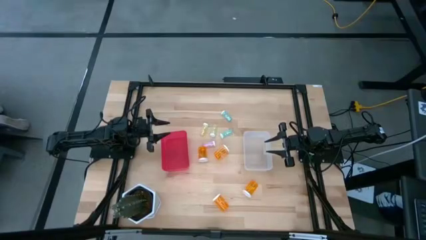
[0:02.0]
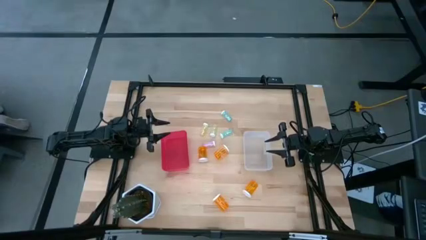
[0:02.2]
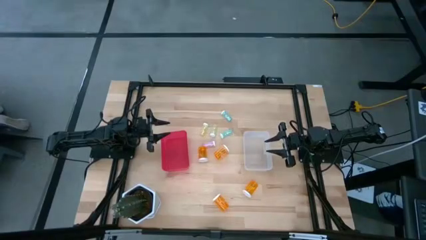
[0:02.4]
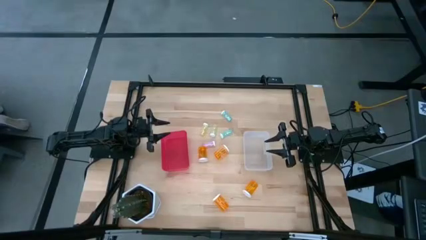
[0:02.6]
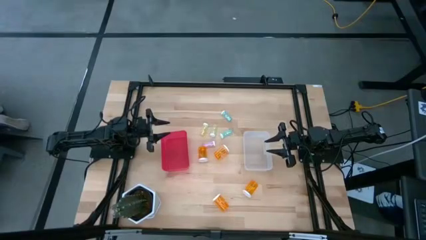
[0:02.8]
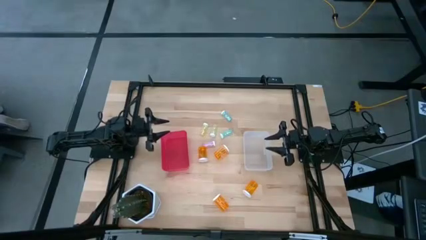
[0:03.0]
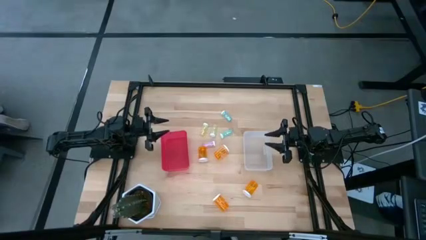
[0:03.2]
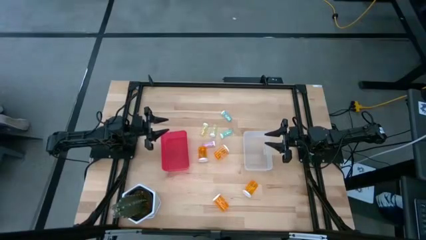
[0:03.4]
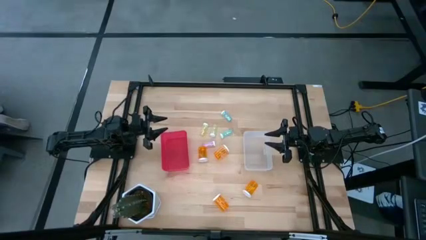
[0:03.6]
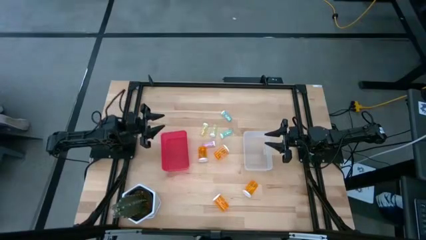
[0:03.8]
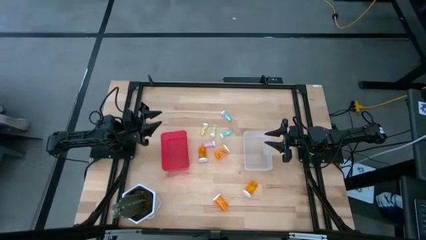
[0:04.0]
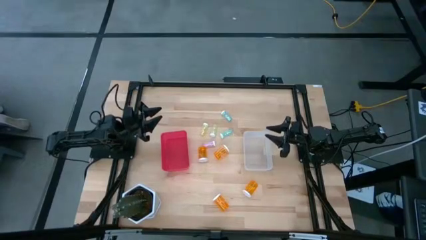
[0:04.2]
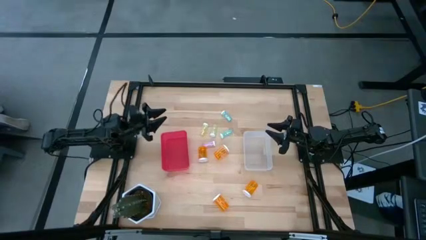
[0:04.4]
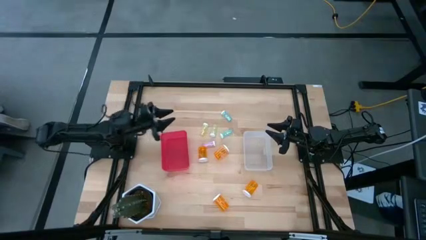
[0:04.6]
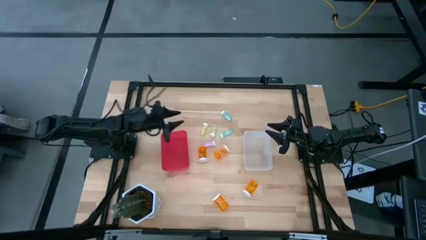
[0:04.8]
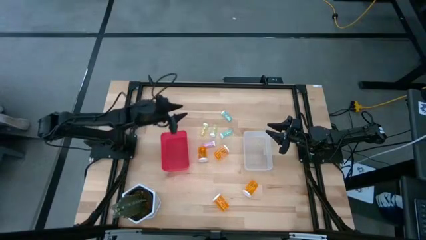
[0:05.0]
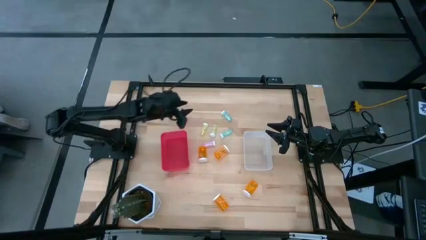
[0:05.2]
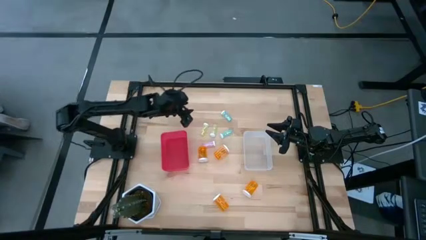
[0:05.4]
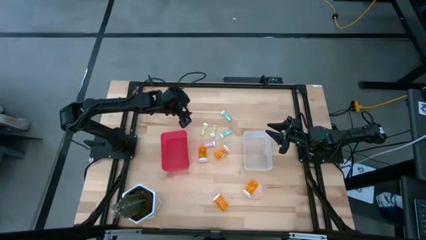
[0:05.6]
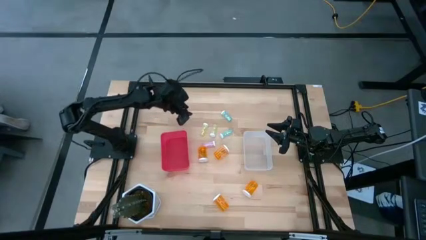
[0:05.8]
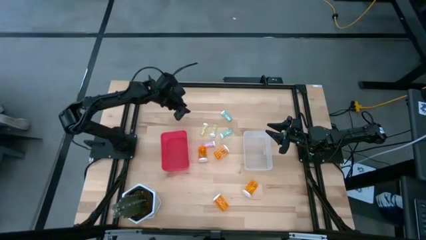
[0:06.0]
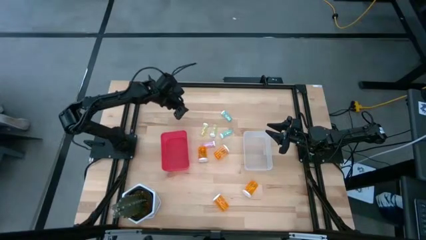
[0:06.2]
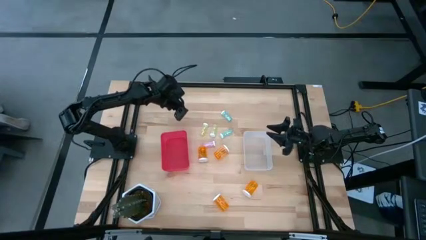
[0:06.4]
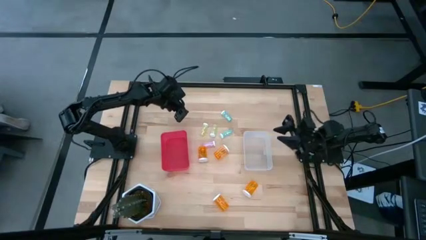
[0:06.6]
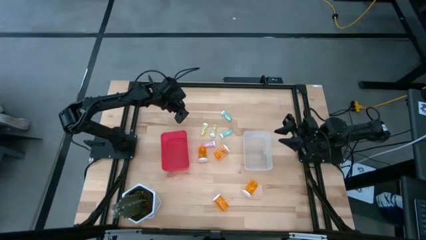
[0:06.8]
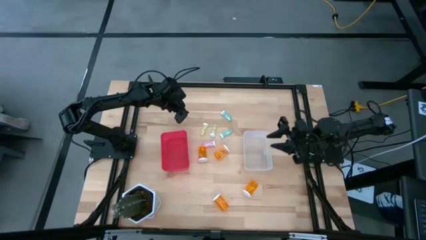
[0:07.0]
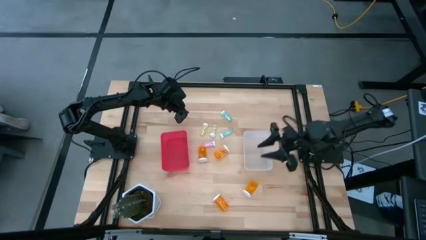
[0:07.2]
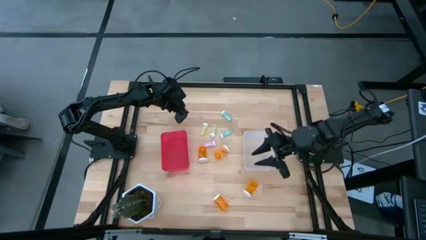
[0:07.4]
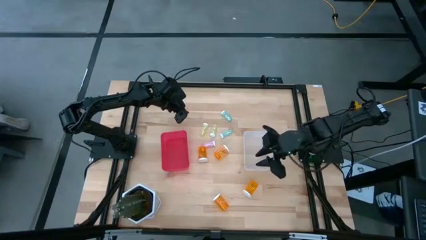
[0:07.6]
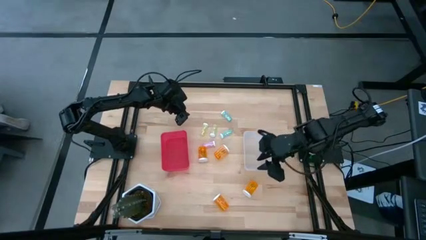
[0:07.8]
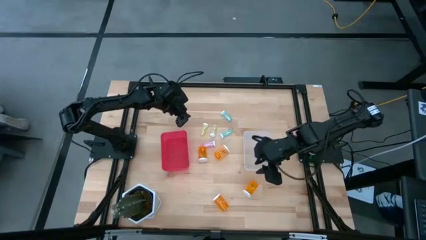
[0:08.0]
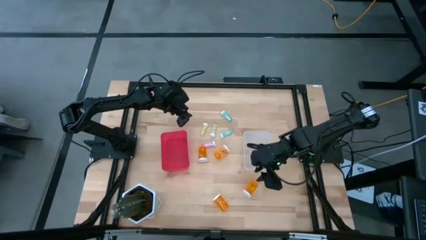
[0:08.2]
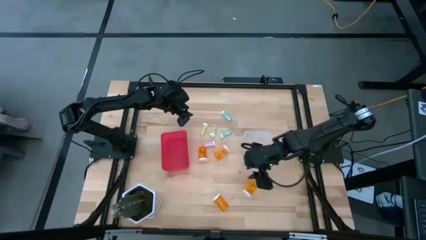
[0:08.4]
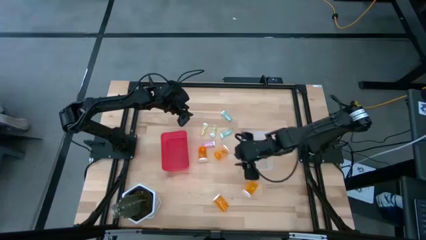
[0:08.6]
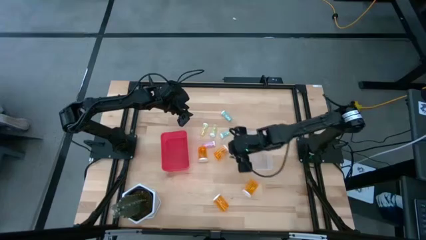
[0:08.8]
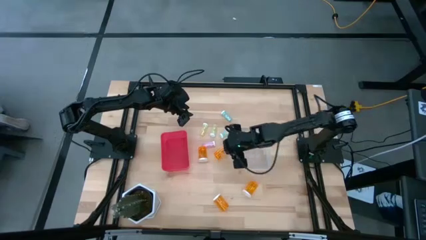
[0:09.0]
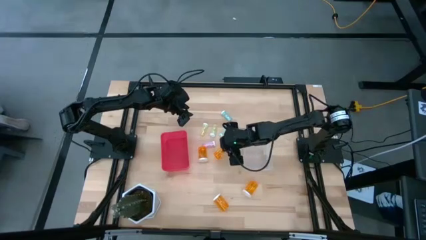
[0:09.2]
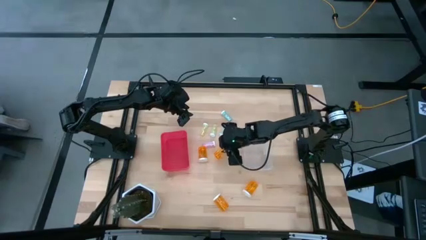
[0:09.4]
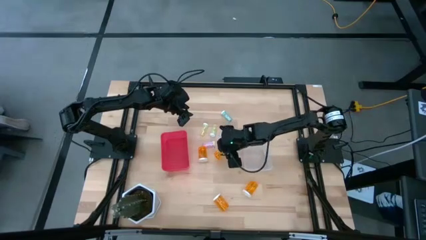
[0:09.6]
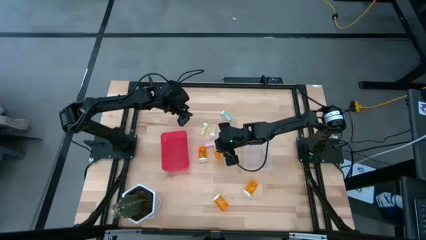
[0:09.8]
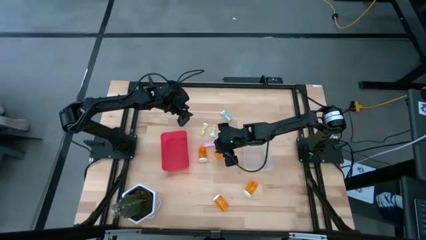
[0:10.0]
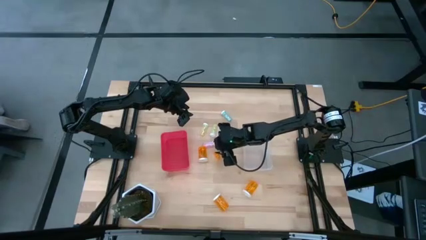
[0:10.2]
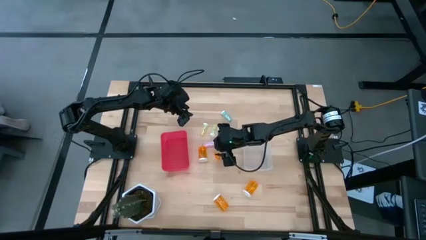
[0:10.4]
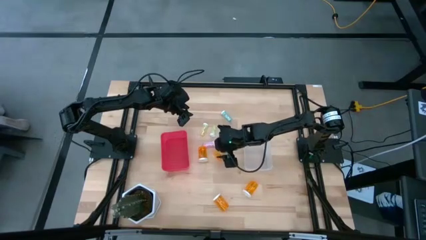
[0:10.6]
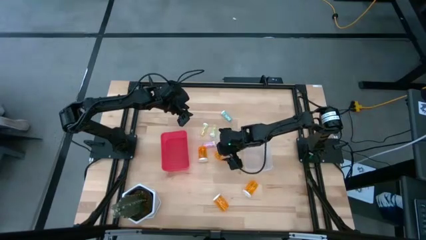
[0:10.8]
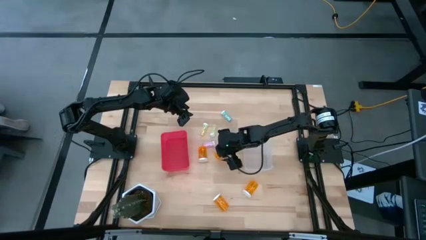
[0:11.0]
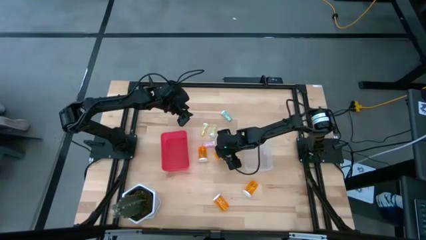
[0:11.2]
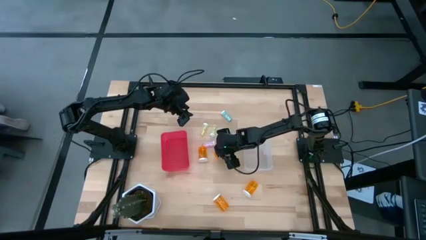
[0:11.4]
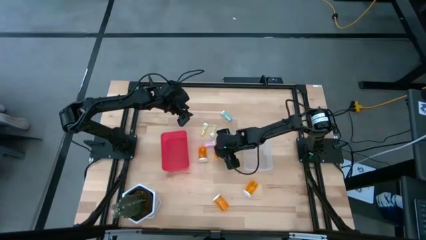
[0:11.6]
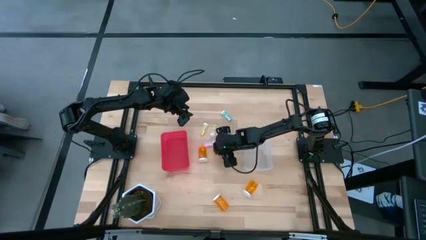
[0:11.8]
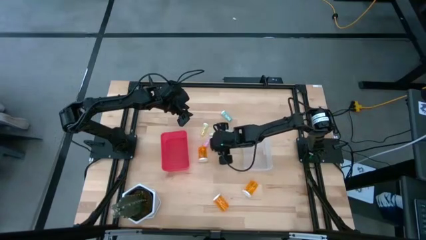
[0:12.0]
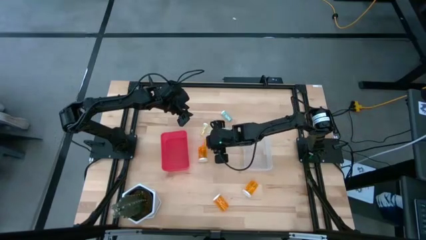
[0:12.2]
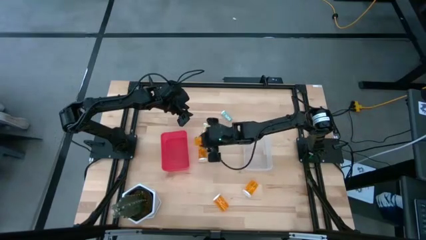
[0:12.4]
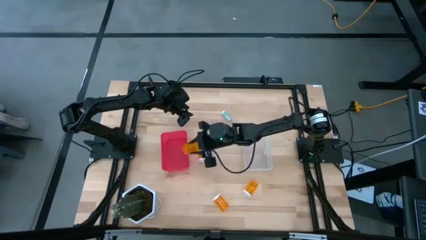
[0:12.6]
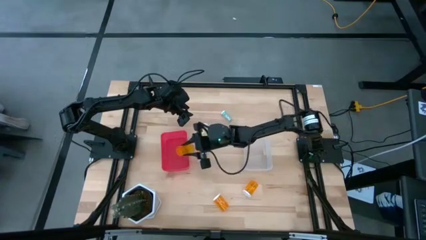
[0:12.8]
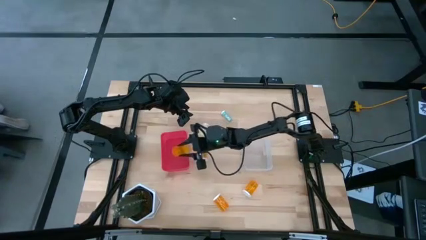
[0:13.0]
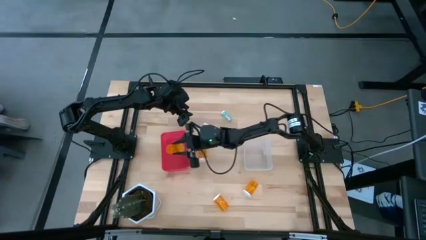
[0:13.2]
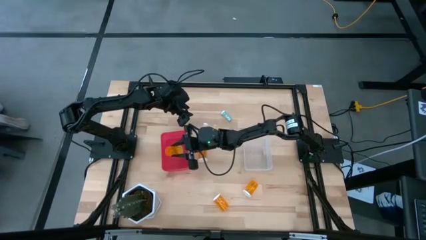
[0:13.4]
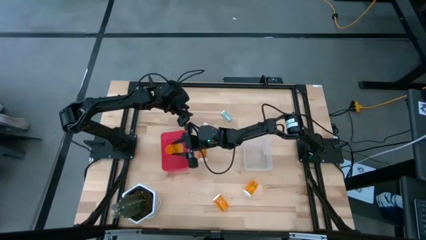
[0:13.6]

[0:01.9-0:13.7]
Task: Pick and place medicine bottles into bin by pill shape (circle, oval)
Put the big orange pill bottle into the red bin
